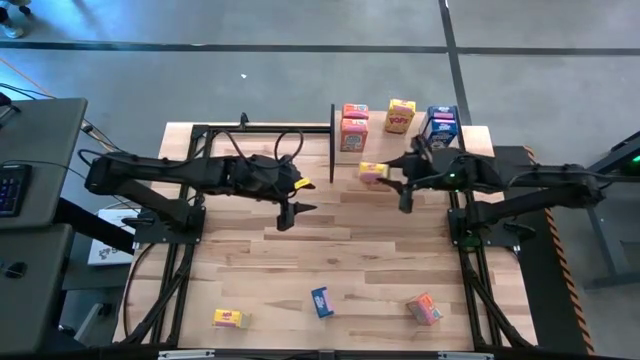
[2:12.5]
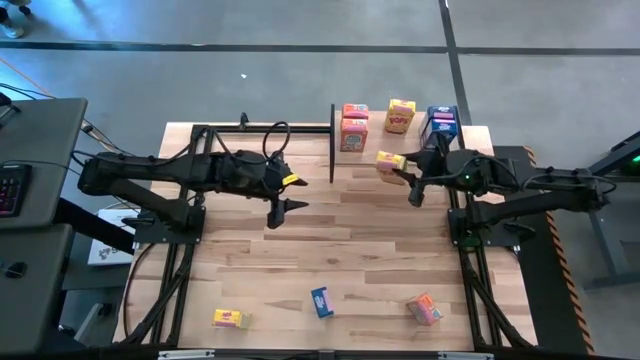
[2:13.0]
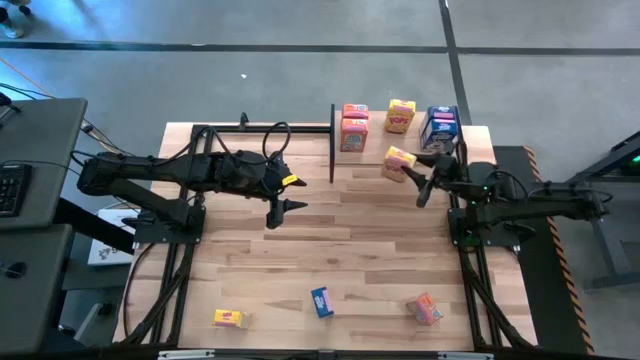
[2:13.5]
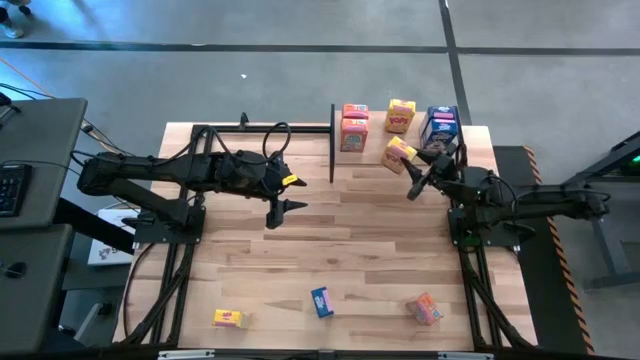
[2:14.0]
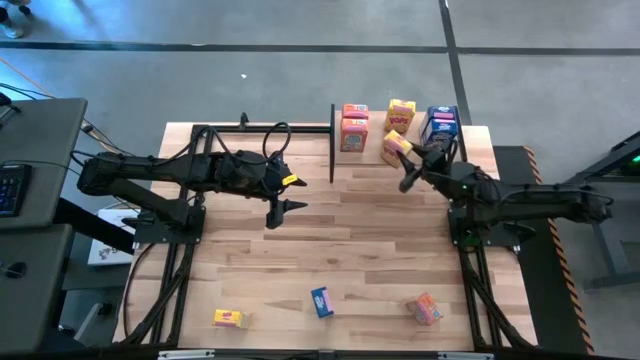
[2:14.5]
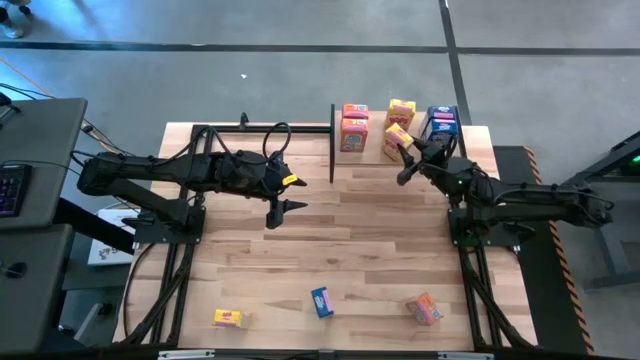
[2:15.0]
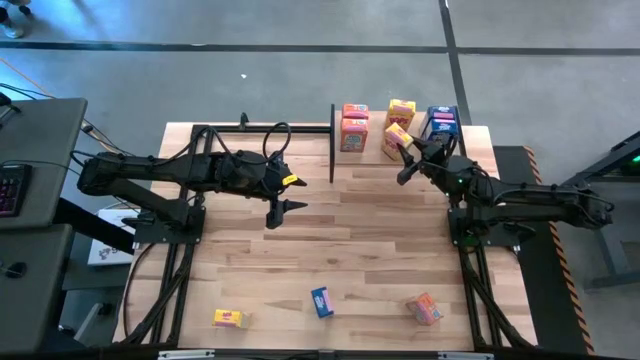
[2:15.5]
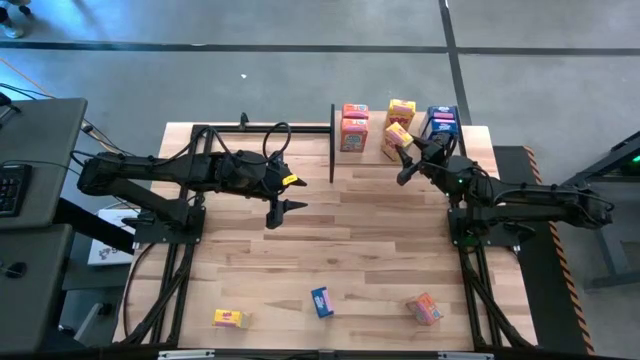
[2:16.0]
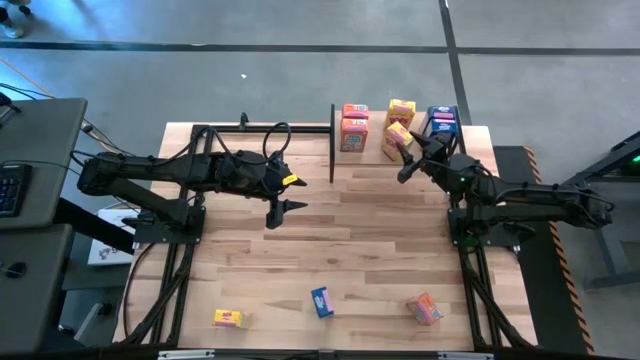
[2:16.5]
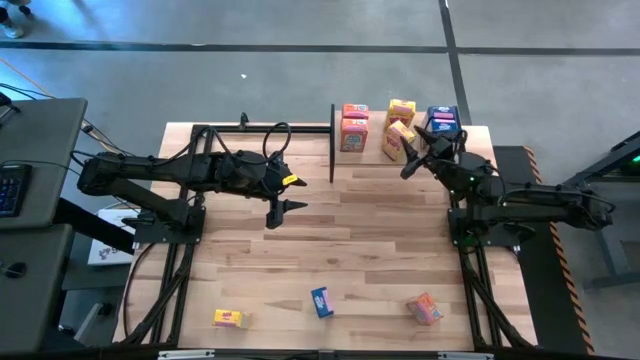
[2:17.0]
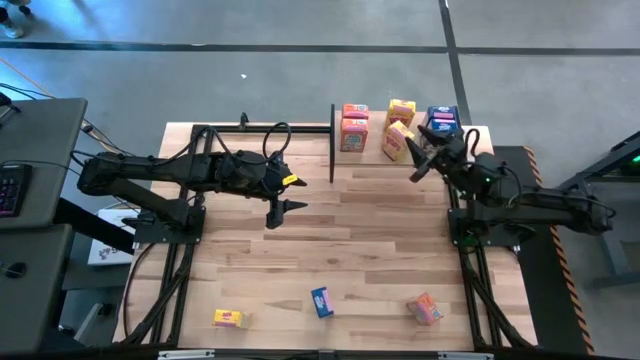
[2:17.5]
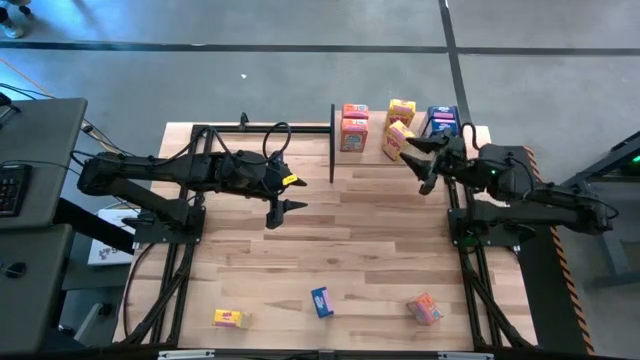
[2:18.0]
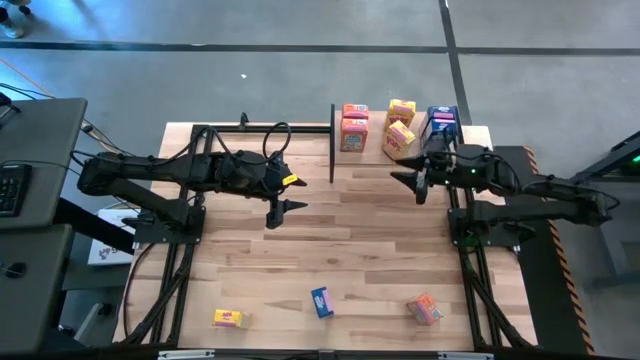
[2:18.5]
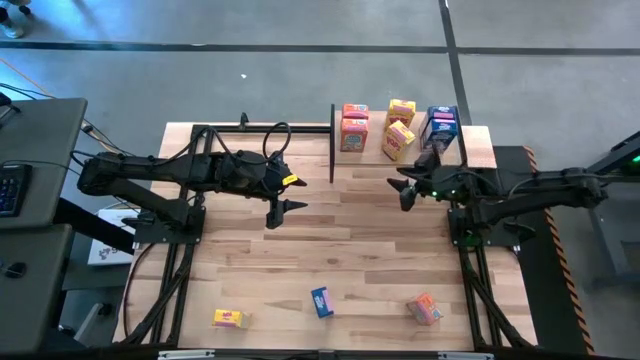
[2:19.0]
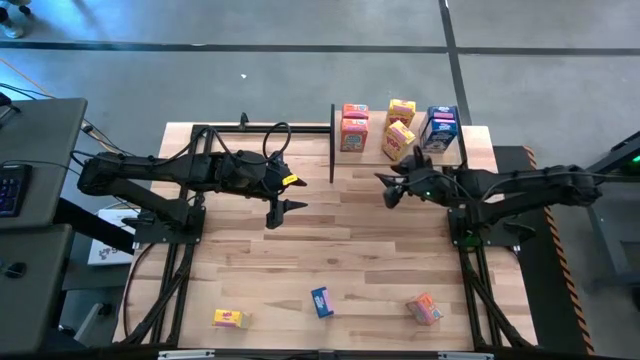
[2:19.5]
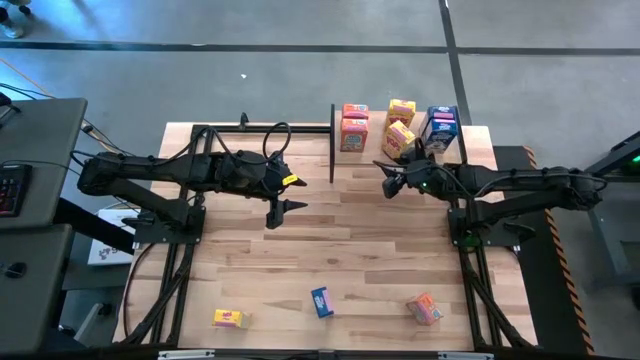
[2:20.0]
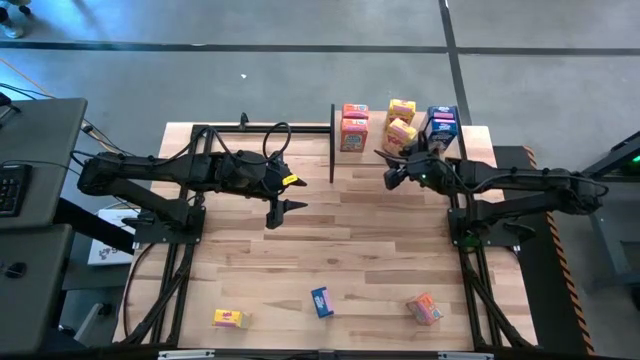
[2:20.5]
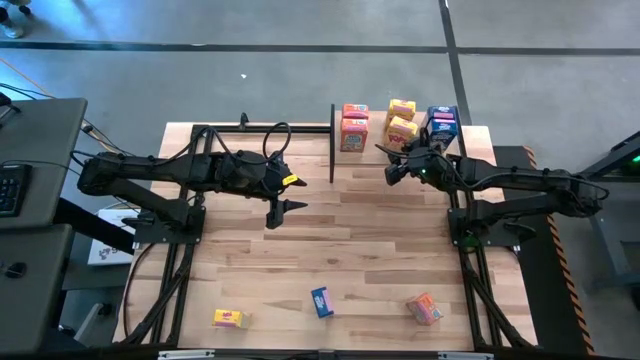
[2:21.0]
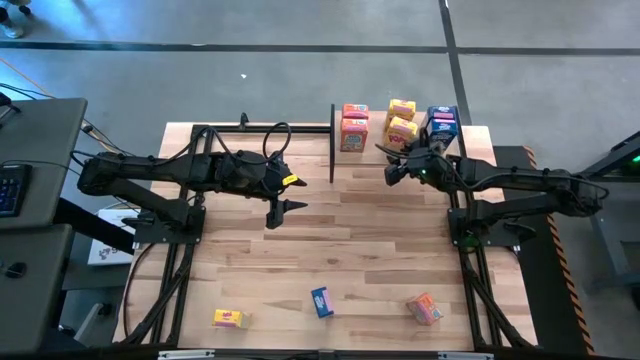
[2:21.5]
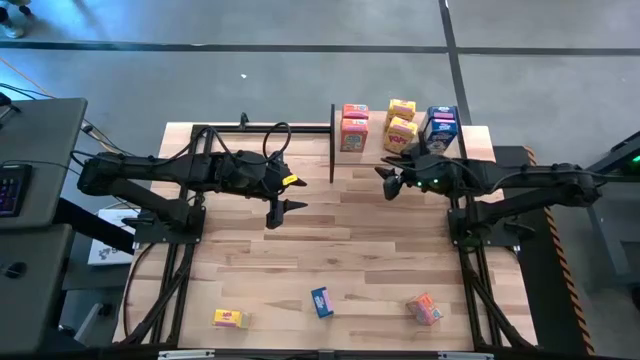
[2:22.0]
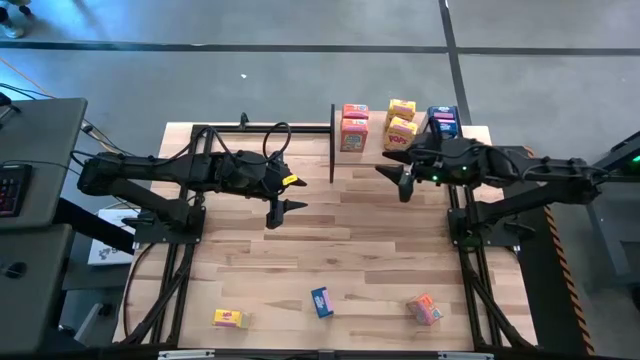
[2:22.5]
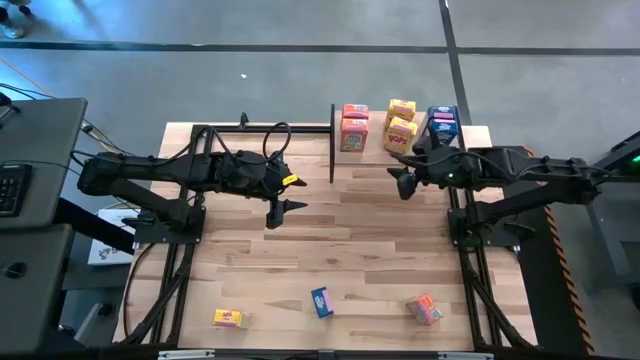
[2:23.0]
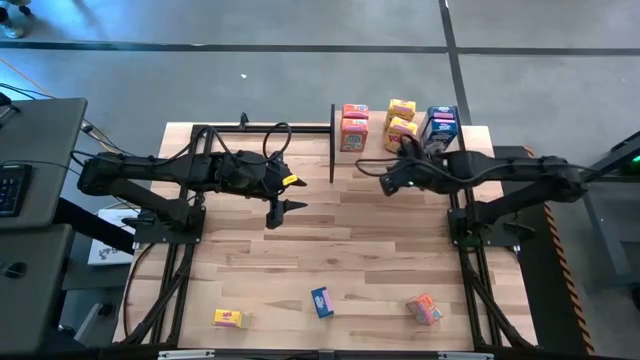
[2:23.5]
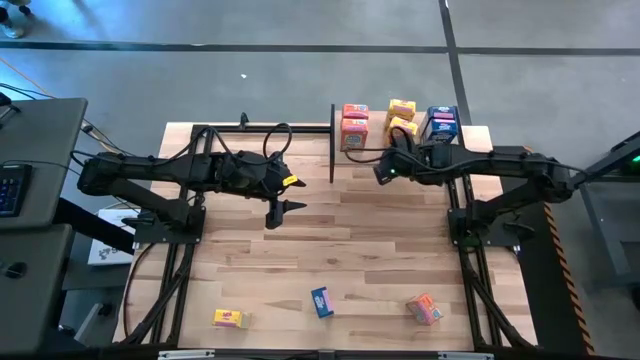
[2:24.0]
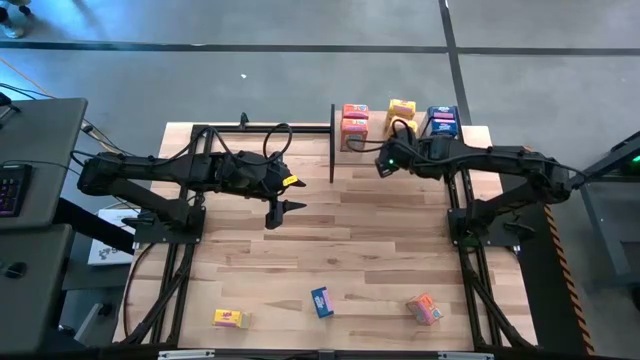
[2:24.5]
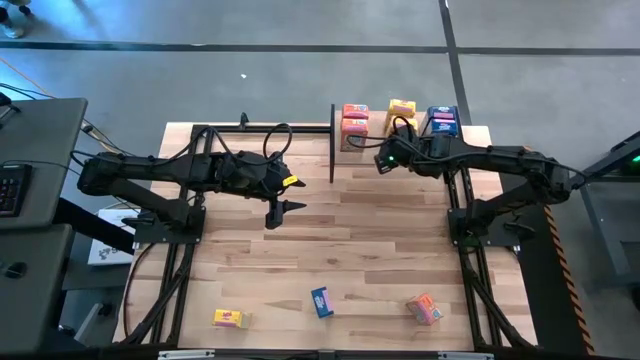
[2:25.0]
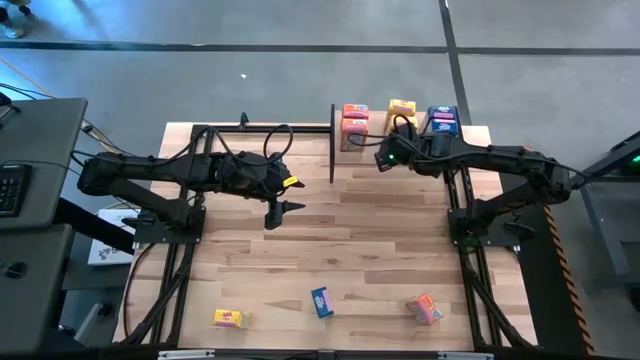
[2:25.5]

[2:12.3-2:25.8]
Task: Stack cereal on shelf
Put the top yellow cereal box on the shelf aligned with the other yellow cereal box

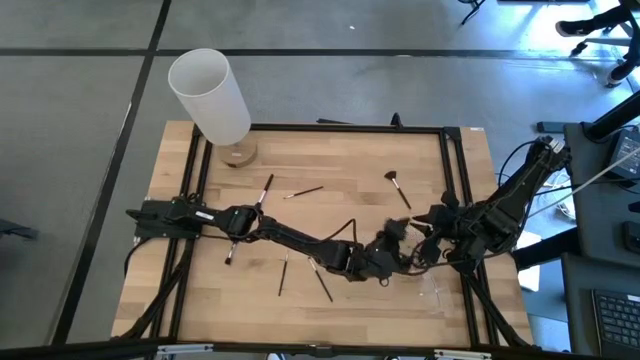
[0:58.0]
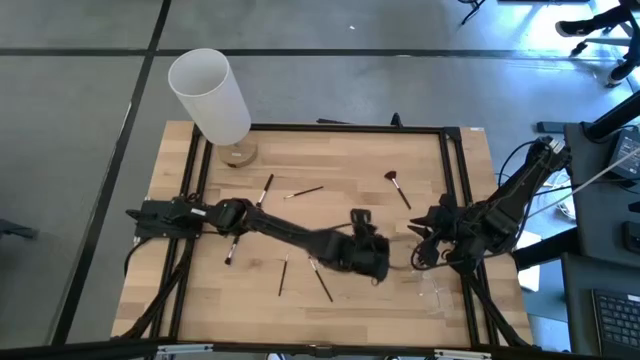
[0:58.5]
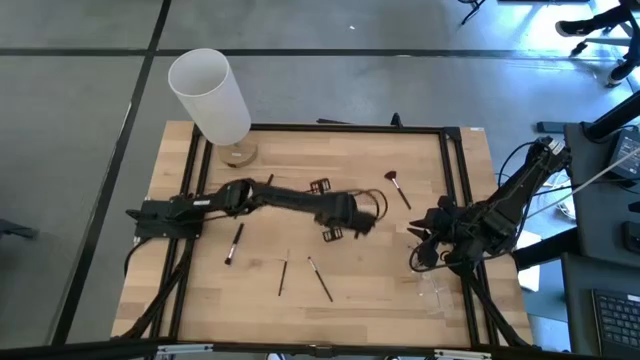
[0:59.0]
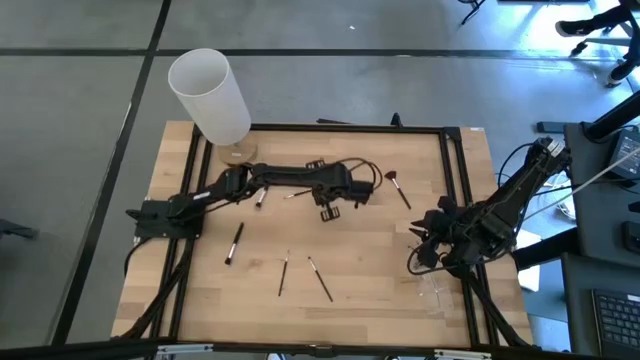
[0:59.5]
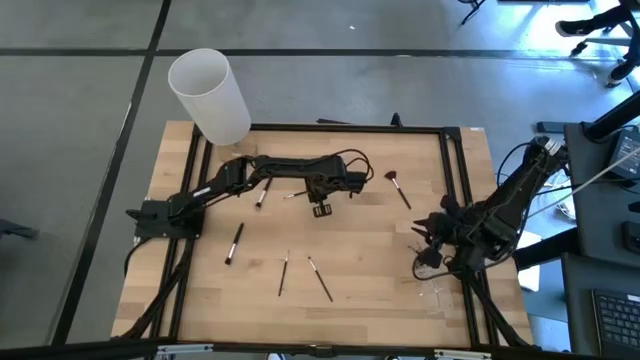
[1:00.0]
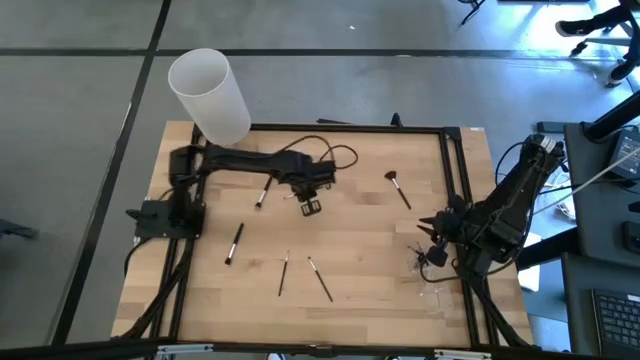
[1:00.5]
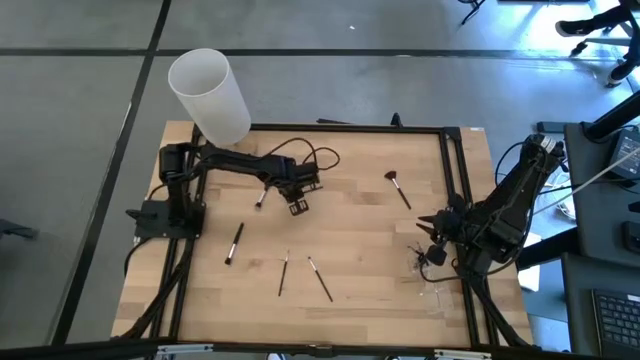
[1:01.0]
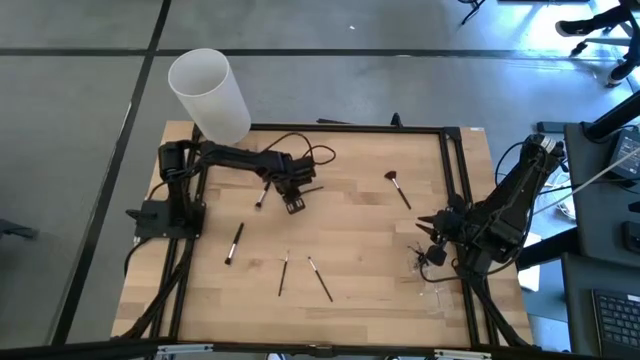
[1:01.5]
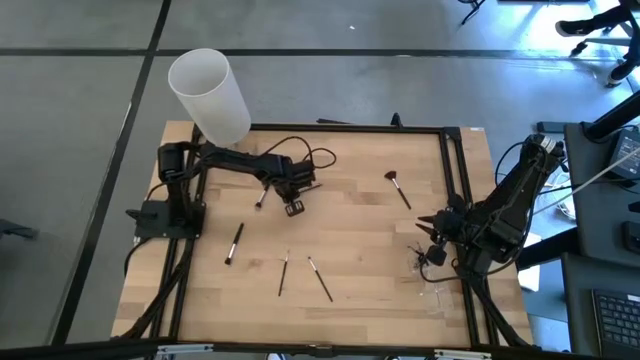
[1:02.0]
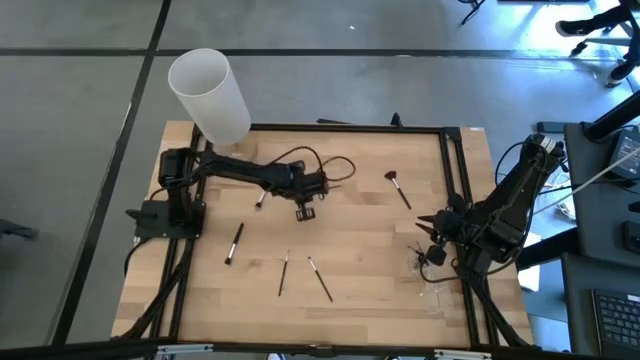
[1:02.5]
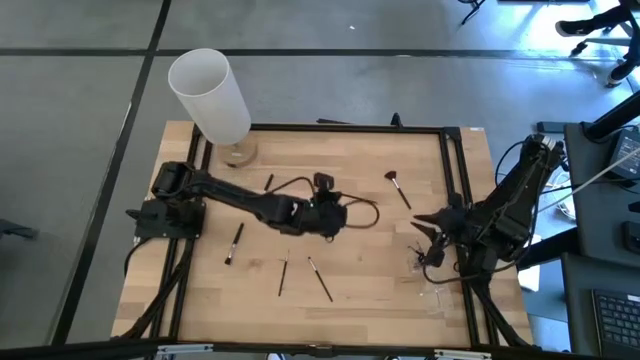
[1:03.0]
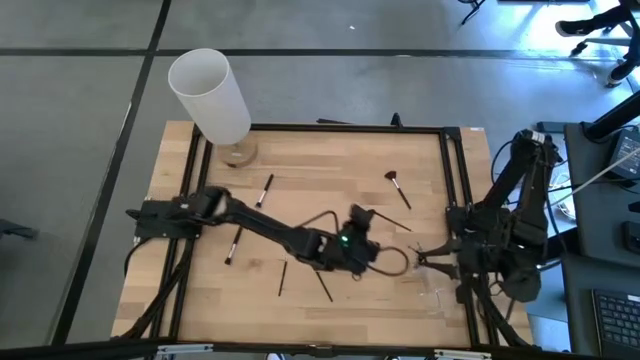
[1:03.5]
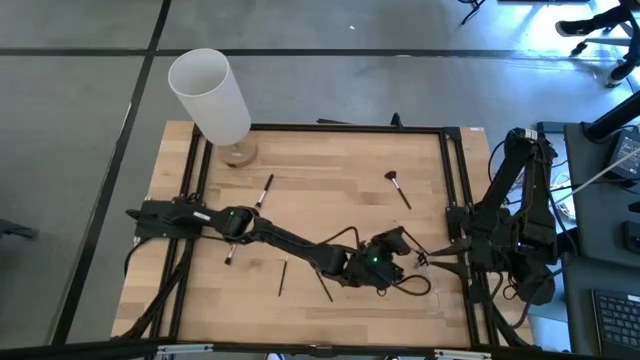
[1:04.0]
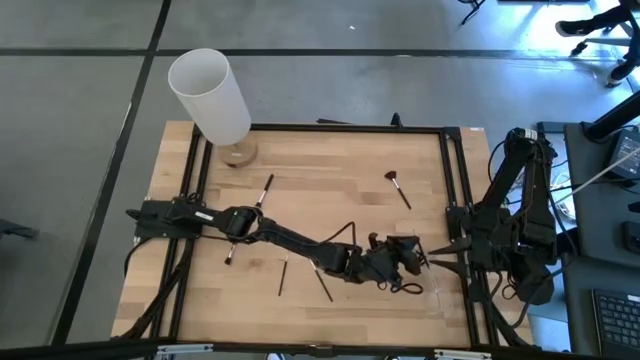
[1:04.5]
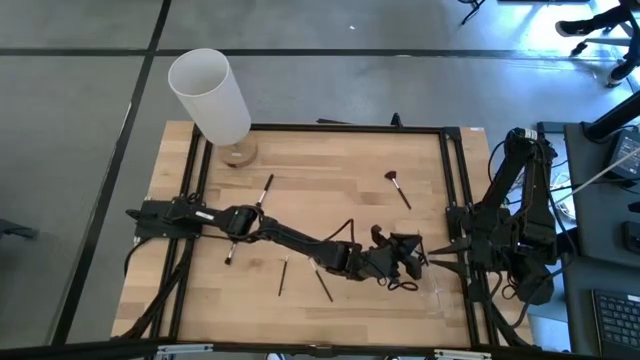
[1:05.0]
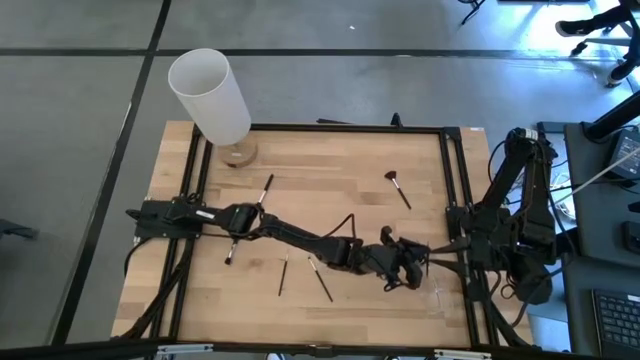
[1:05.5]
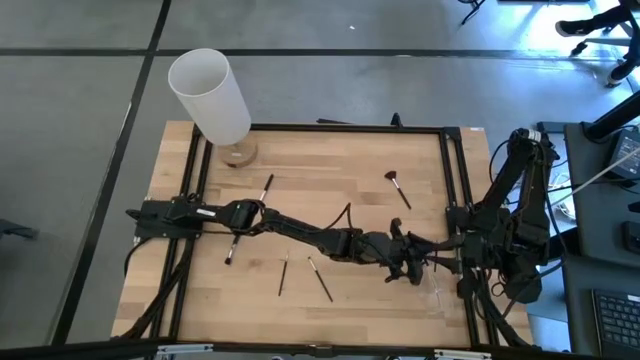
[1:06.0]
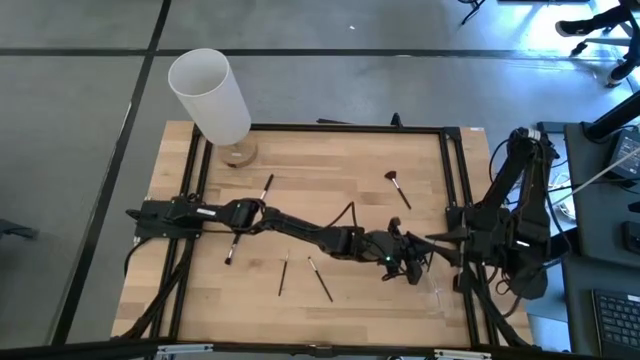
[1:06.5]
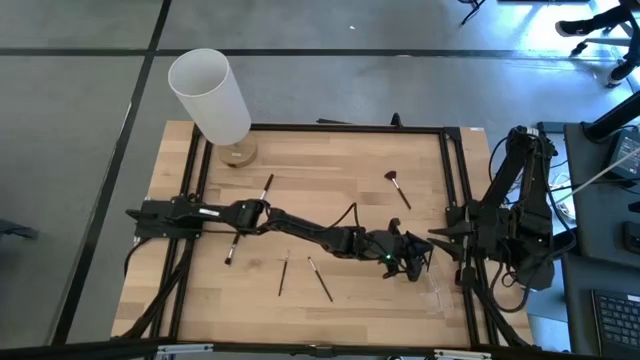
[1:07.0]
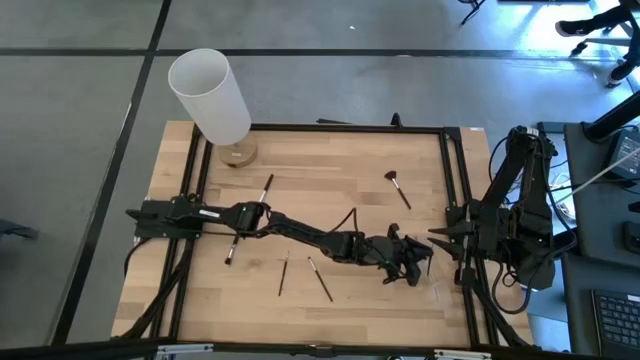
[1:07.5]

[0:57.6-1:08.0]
Task: Put items in baskets/containers
Put the black liner brush into the transparent organizer
